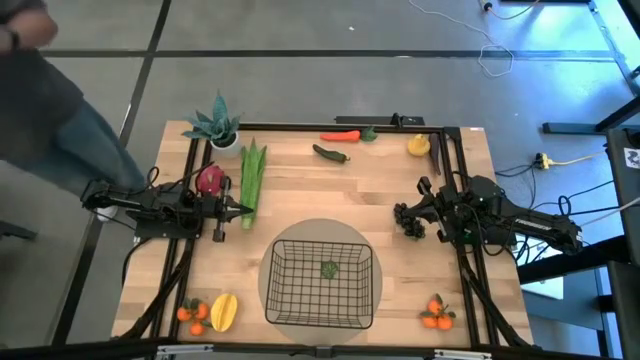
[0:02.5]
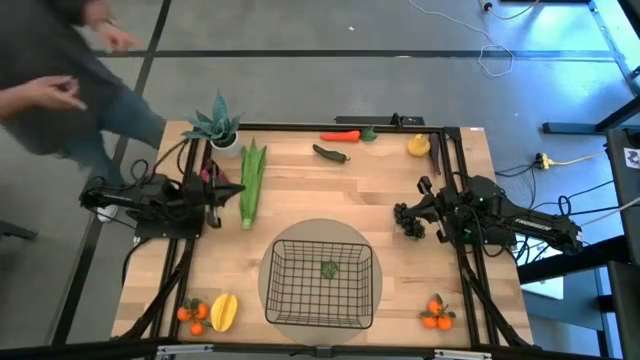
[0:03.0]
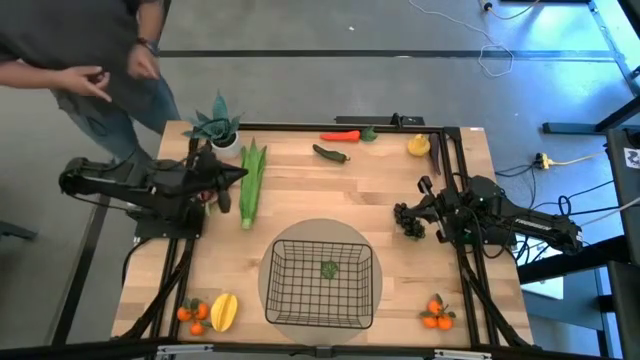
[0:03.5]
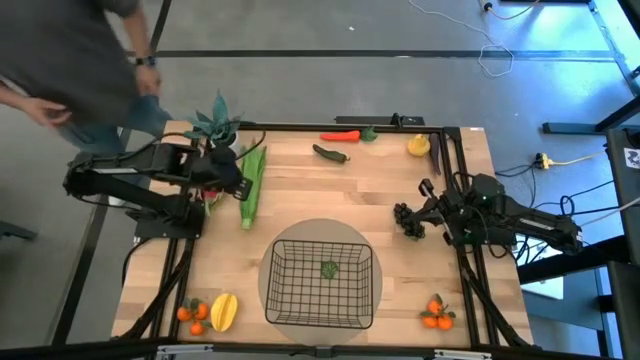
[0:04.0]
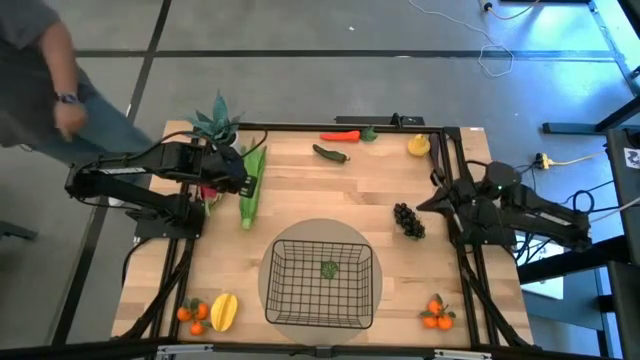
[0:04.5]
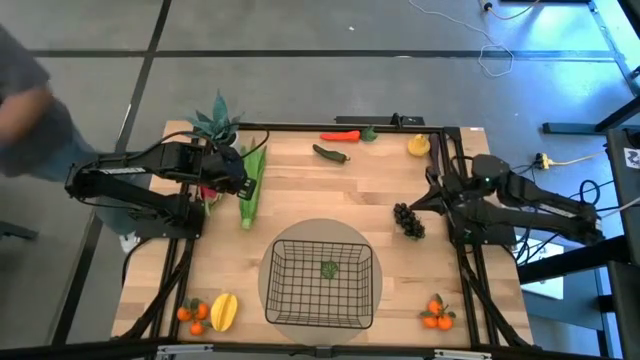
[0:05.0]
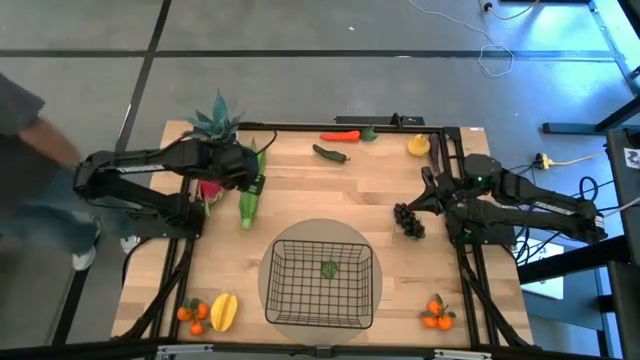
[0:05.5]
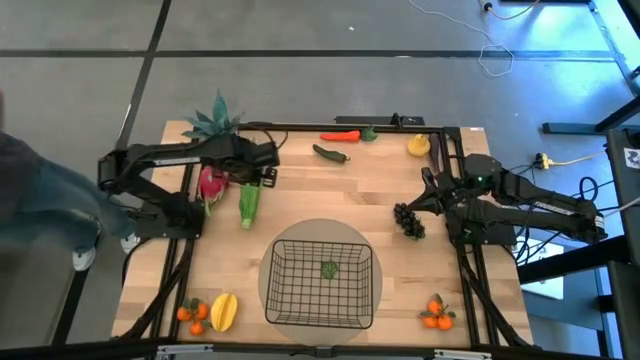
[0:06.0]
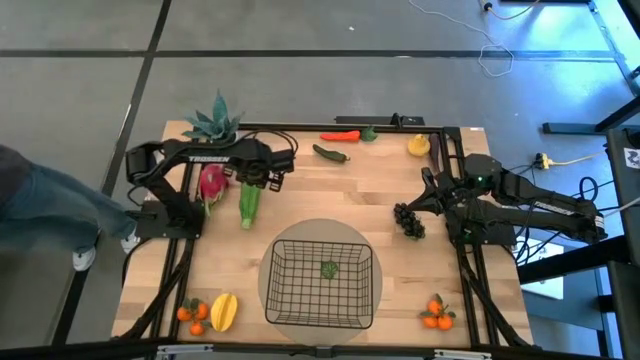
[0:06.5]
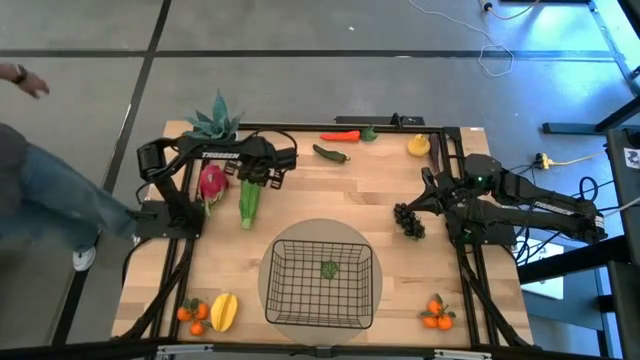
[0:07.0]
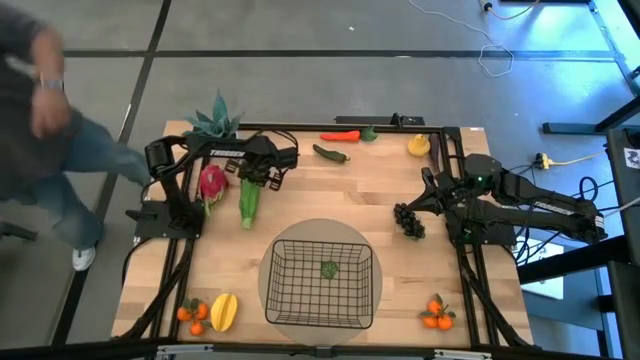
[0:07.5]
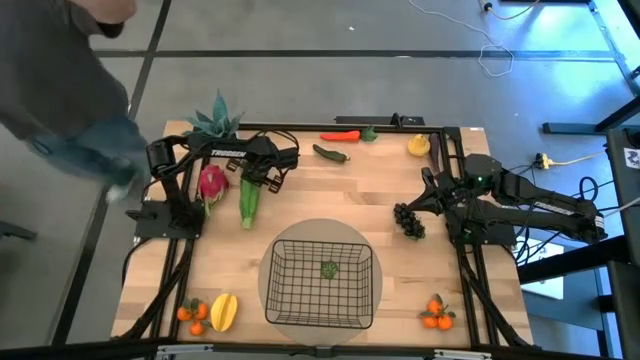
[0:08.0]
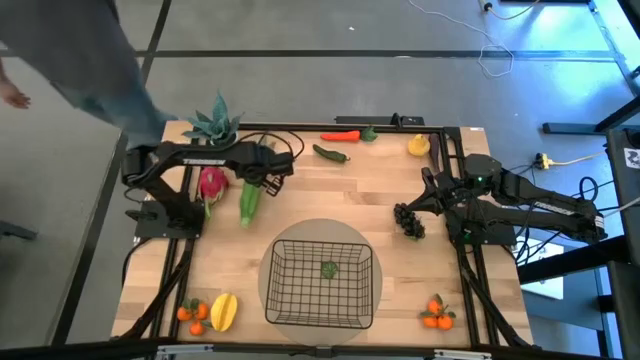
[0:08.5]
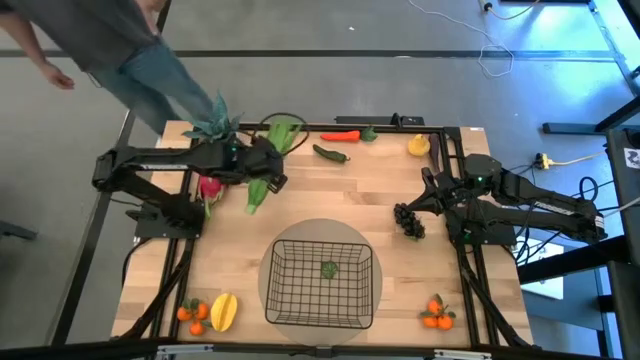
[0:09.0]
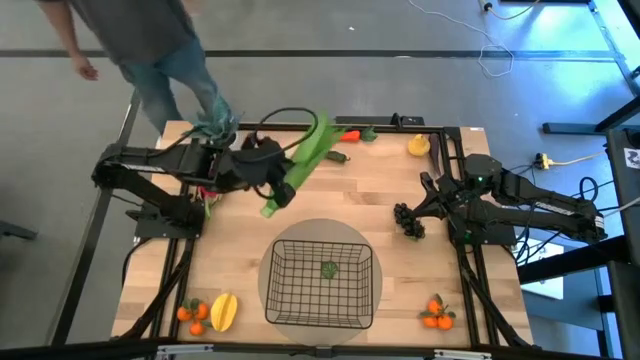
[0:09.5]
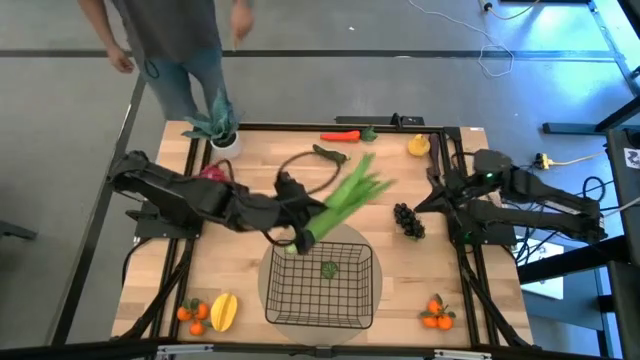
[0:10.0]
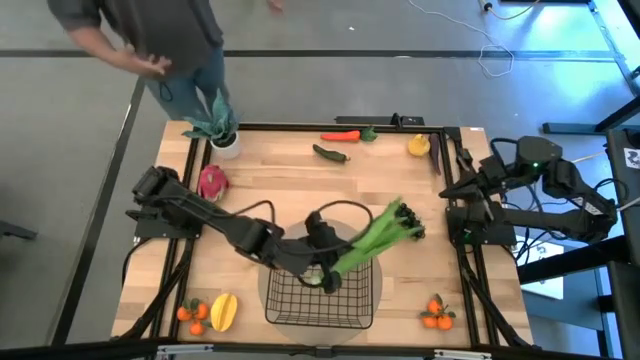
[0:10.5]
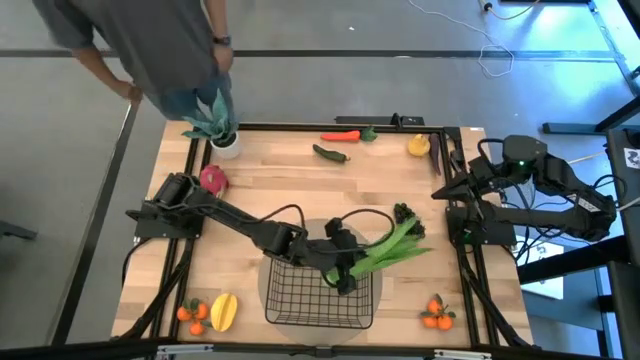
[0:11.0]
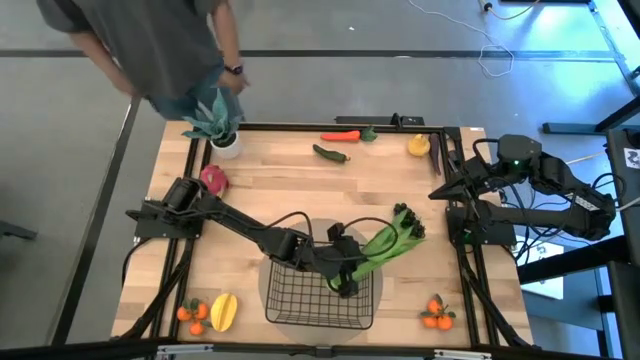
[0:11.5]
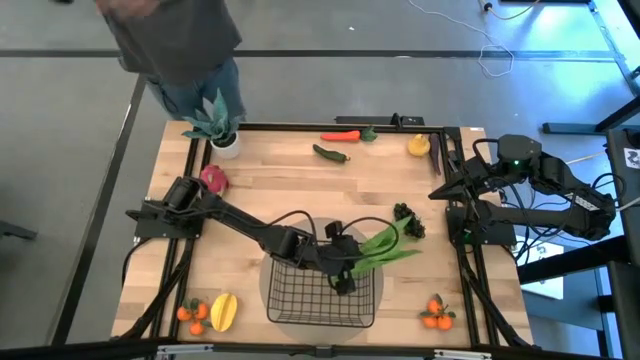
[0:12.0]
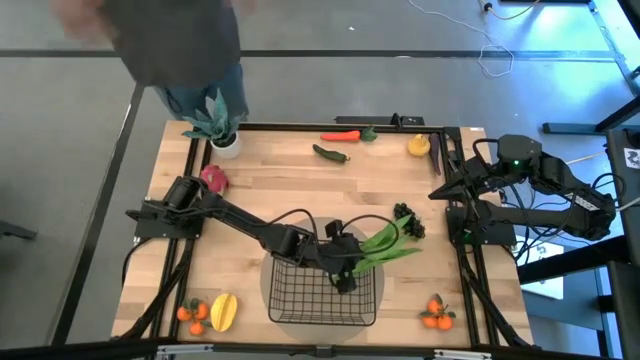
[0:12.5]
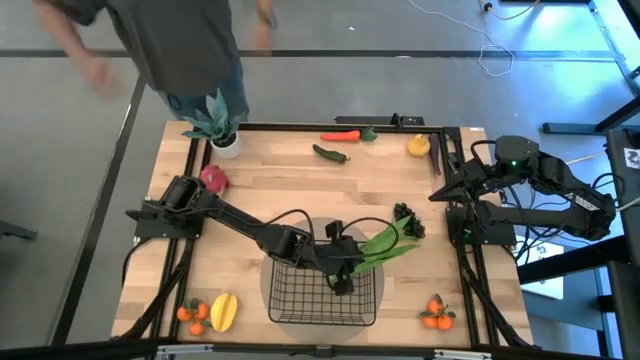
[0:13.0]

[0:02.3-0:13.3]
Task: Build produce basket
Put the Chinese cabbage into the black mesh basket

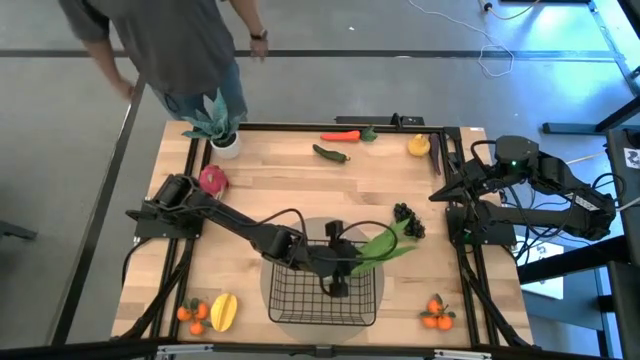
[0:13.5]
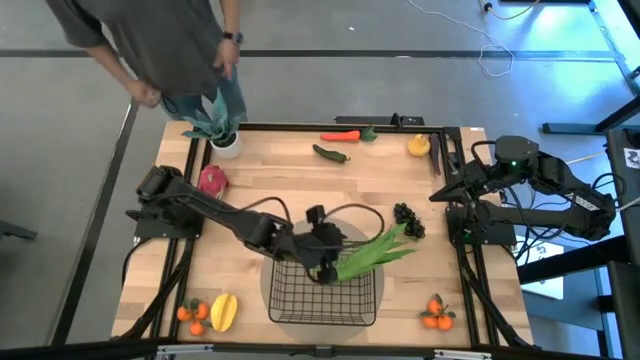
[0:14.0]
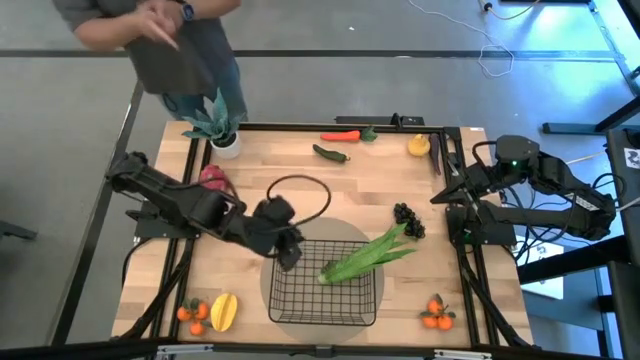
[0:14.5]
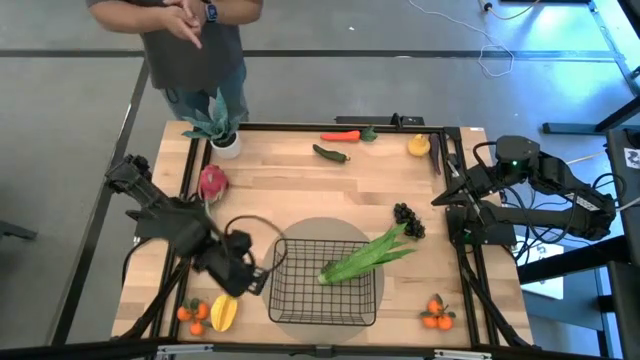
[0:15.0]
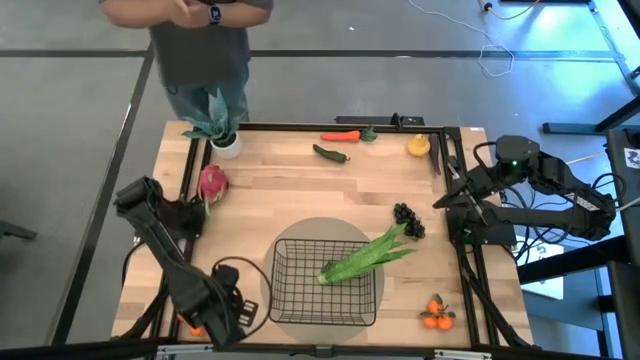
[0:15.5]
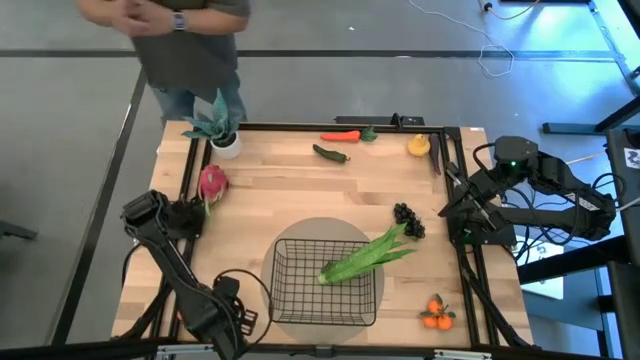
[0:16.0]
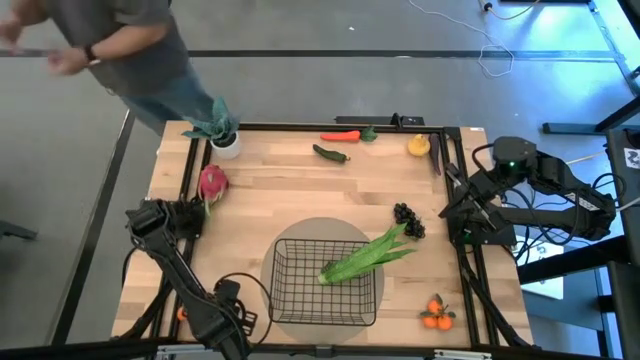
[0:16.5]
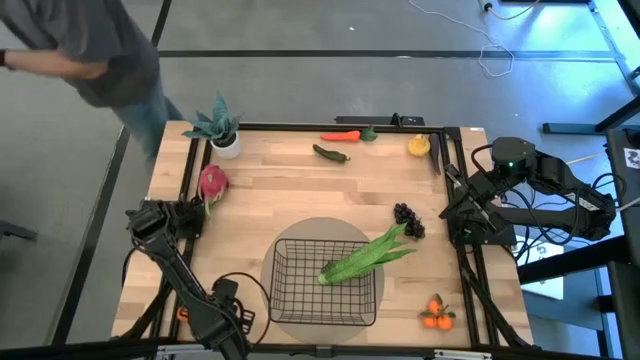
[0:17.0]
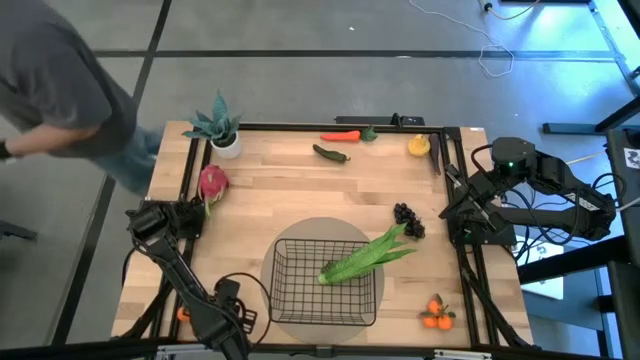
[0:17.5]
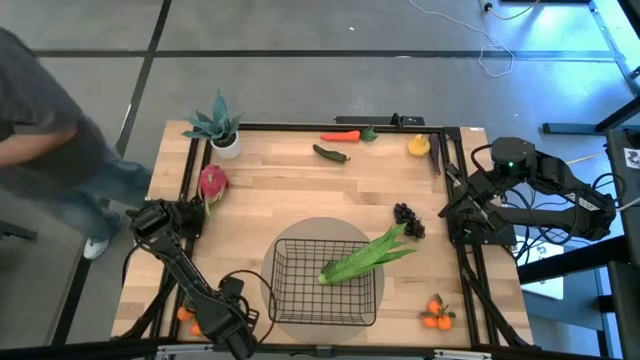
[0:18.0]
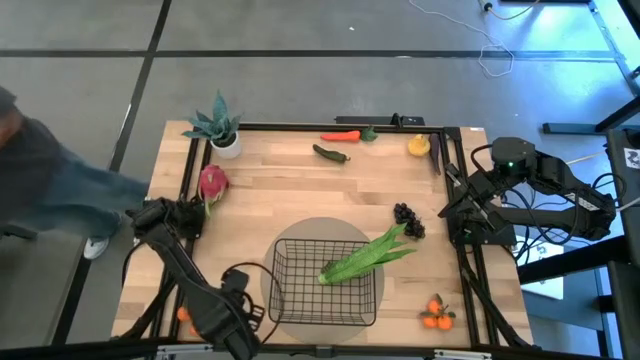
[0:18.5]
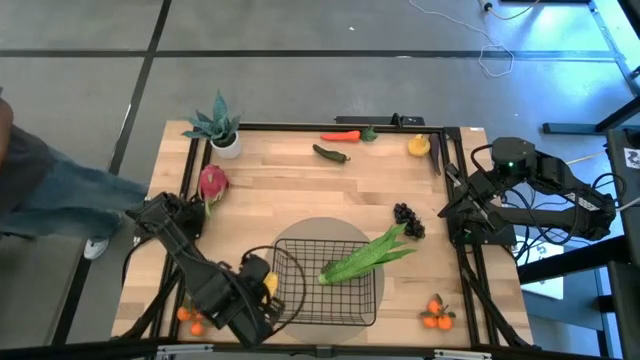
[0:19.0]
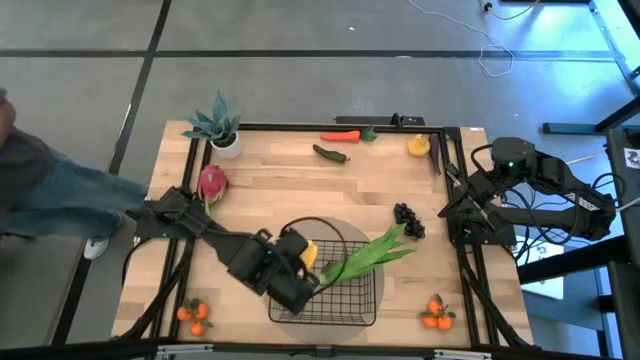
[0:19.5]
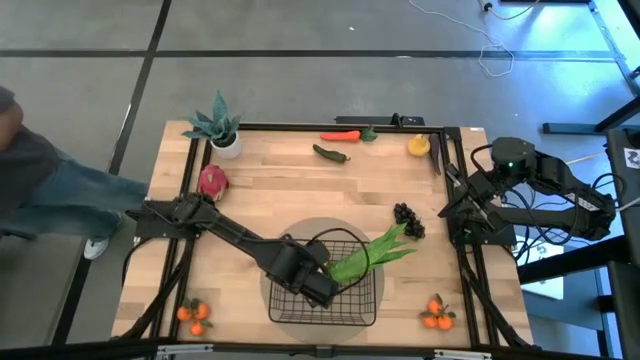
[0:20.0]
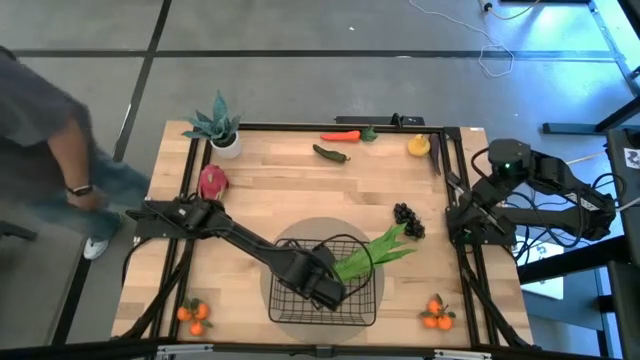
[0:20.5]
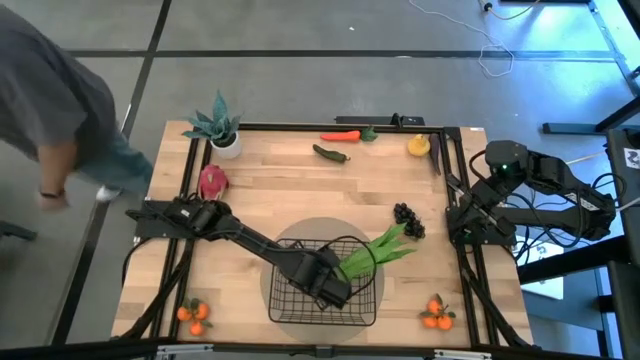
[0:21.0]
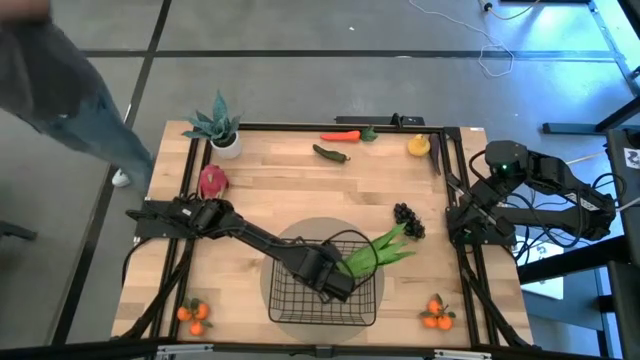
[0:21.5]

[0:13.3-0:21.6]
Put the star fruit into the black mesh basket
